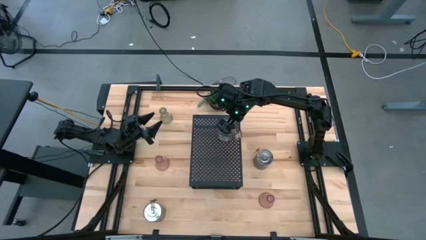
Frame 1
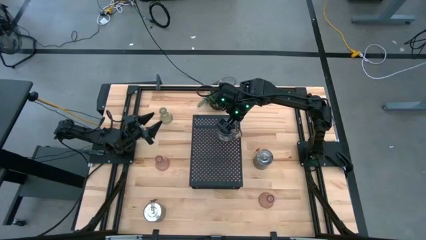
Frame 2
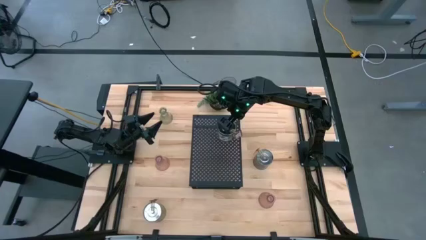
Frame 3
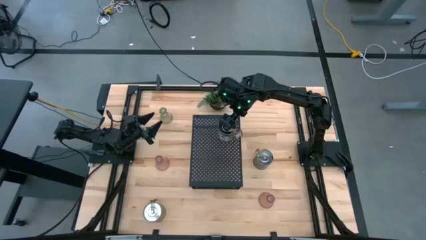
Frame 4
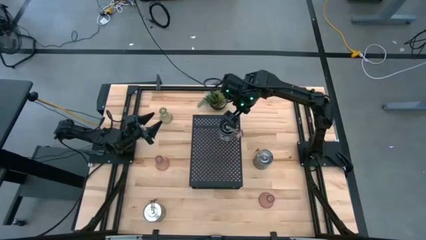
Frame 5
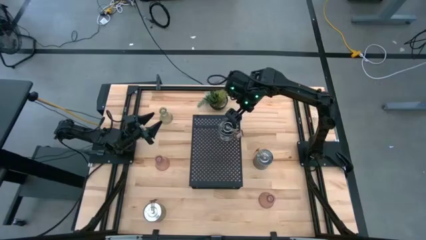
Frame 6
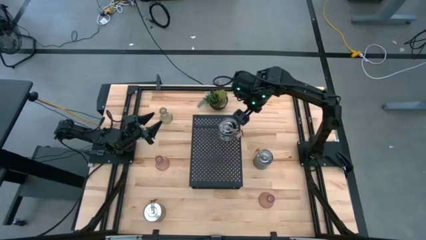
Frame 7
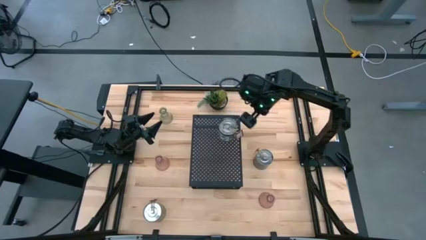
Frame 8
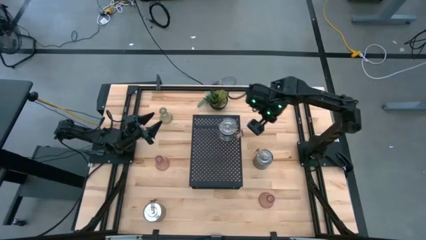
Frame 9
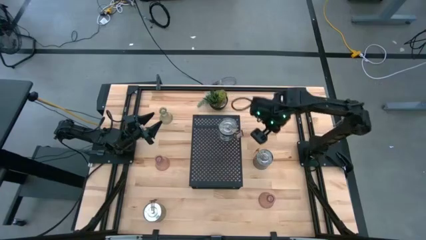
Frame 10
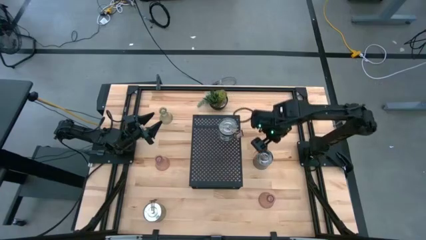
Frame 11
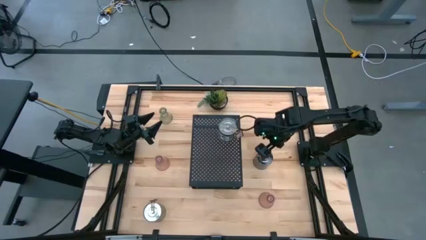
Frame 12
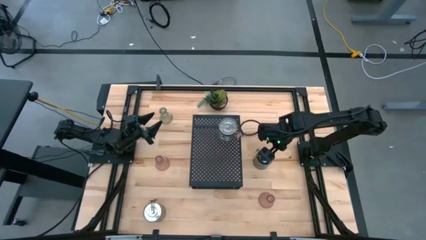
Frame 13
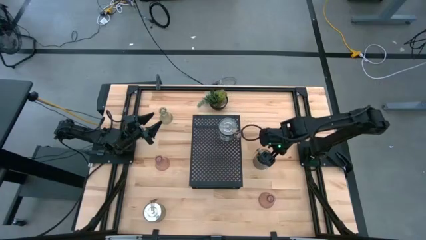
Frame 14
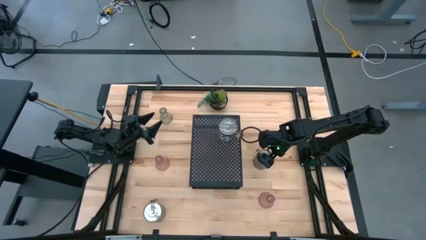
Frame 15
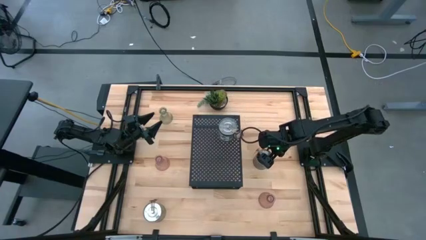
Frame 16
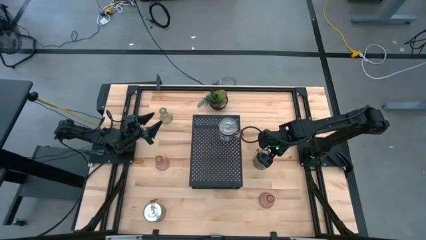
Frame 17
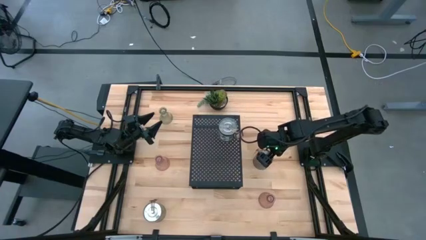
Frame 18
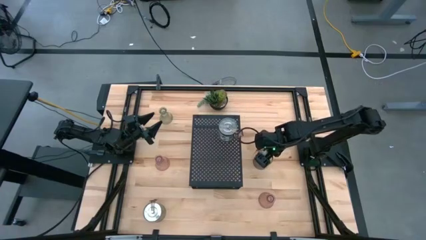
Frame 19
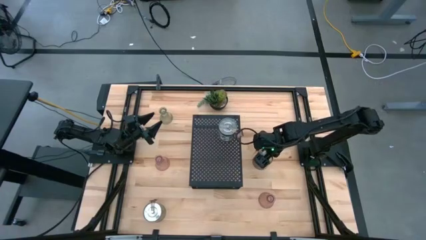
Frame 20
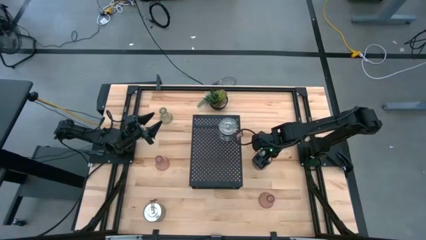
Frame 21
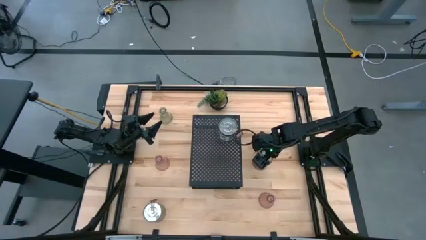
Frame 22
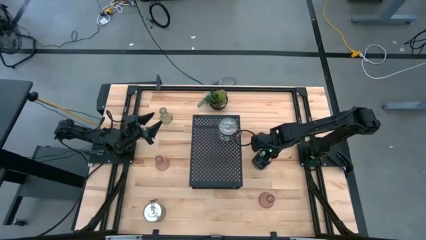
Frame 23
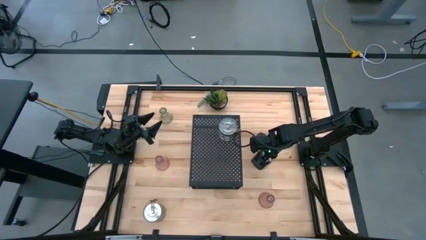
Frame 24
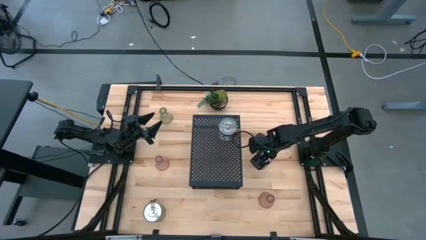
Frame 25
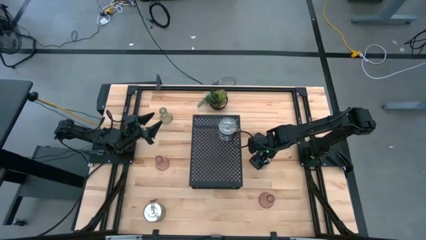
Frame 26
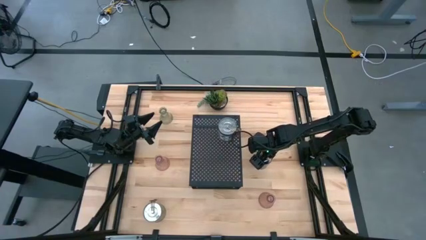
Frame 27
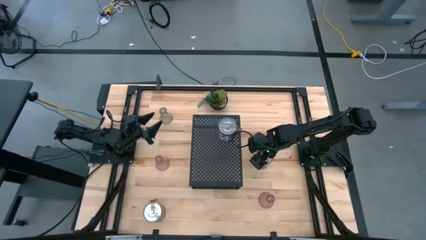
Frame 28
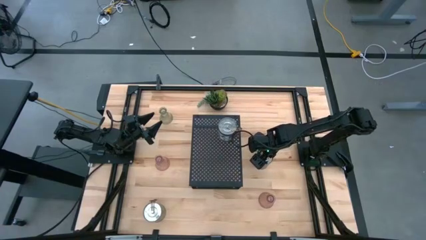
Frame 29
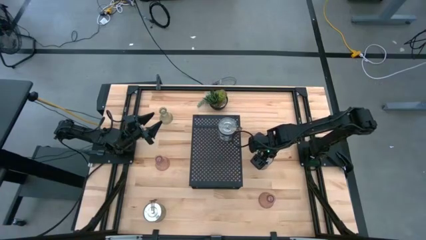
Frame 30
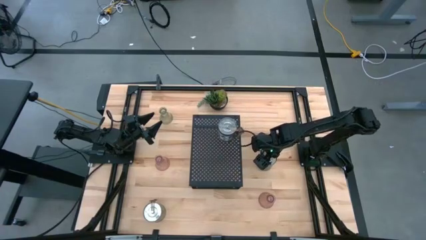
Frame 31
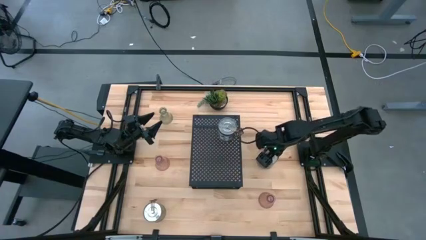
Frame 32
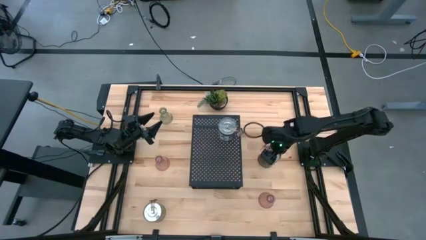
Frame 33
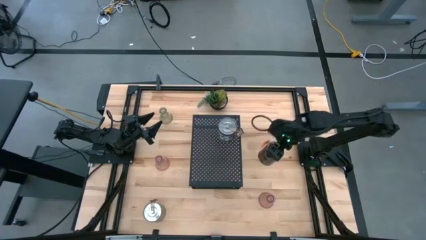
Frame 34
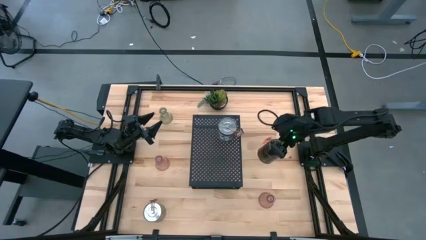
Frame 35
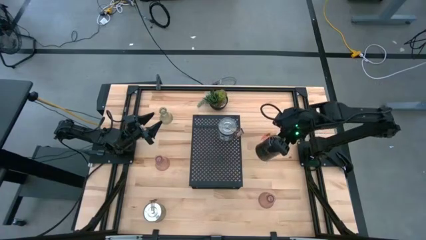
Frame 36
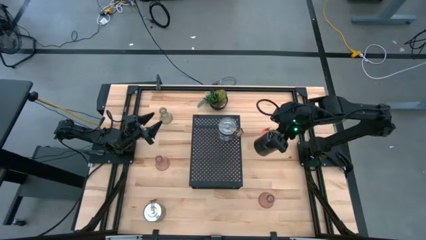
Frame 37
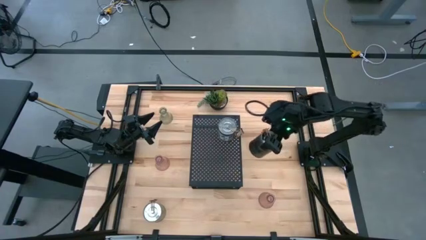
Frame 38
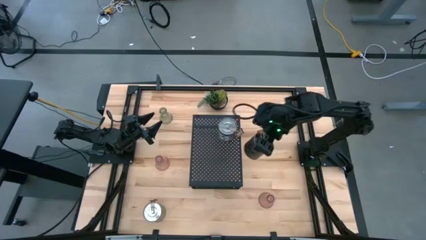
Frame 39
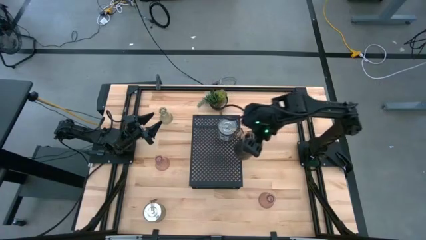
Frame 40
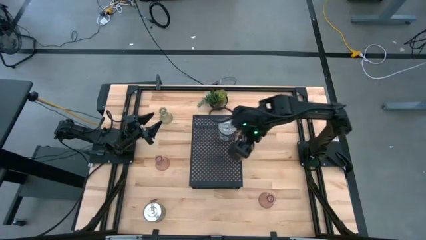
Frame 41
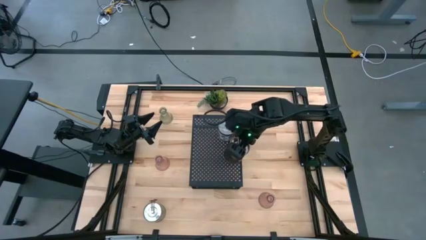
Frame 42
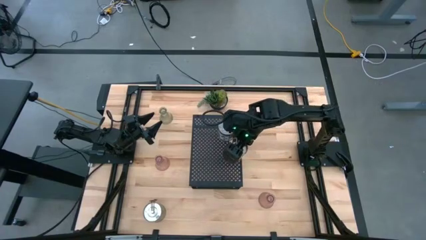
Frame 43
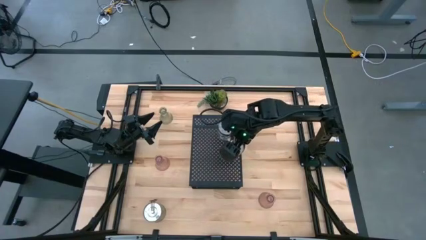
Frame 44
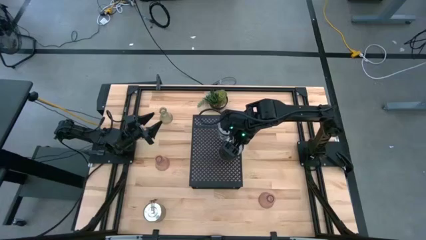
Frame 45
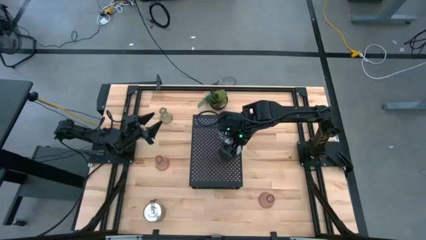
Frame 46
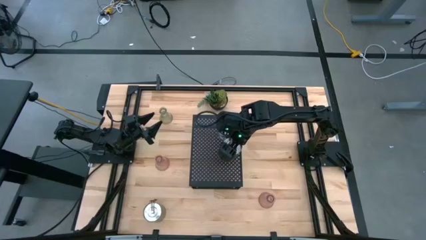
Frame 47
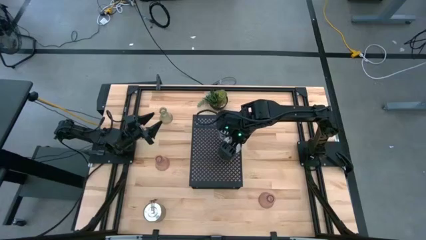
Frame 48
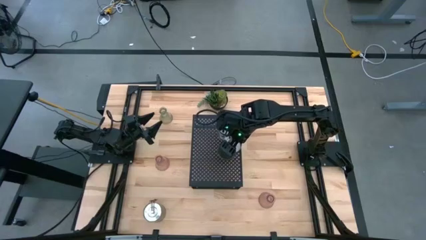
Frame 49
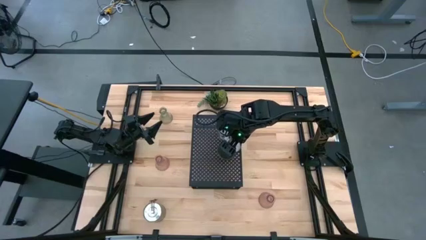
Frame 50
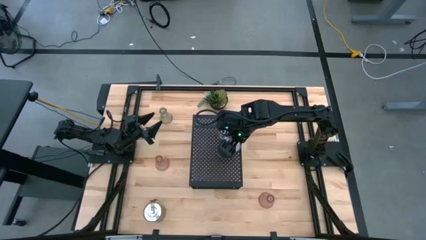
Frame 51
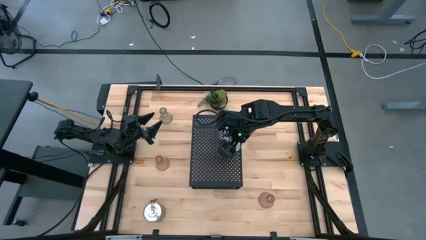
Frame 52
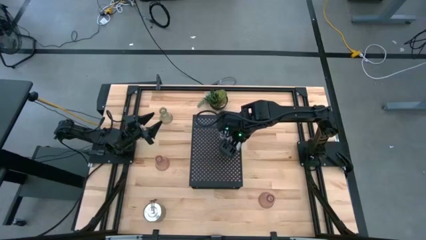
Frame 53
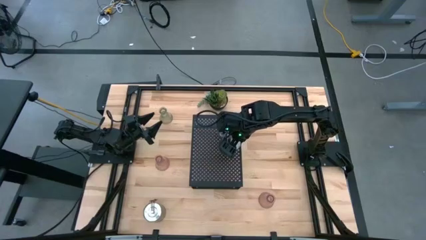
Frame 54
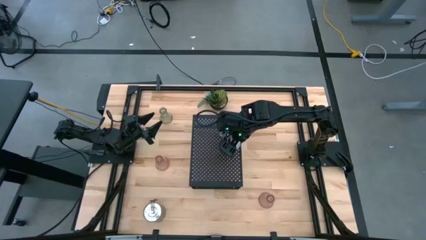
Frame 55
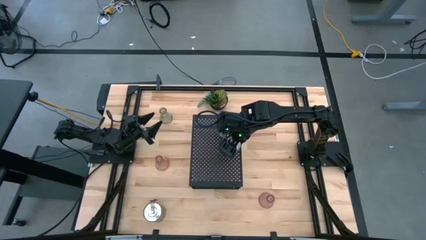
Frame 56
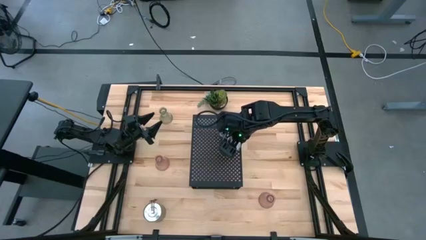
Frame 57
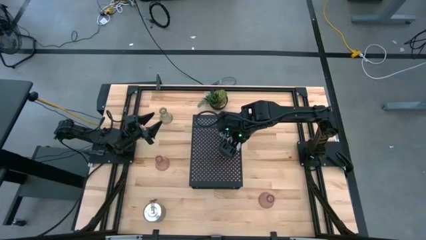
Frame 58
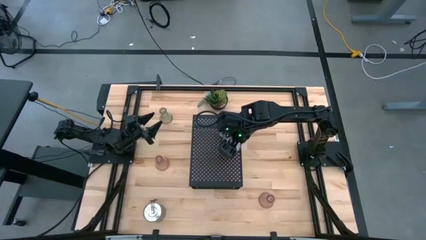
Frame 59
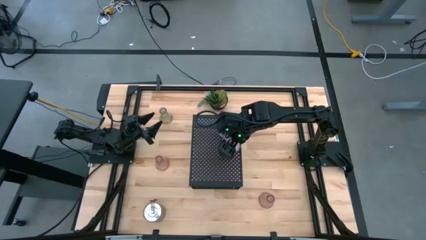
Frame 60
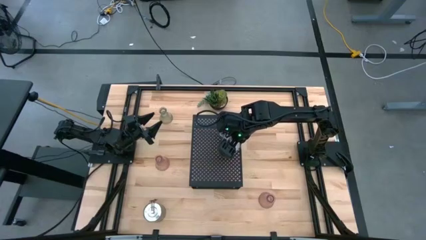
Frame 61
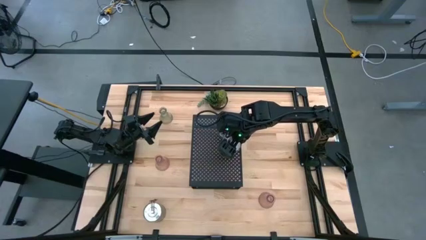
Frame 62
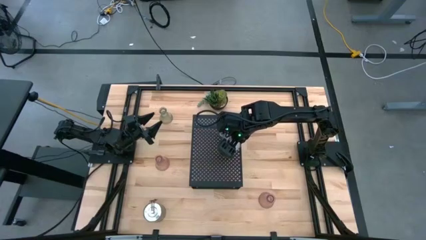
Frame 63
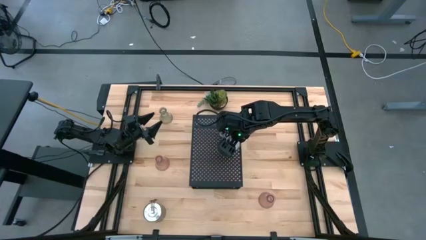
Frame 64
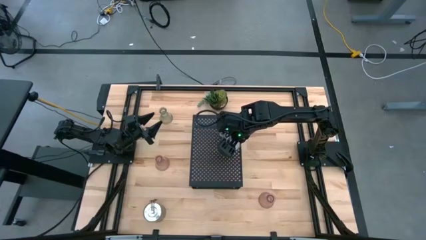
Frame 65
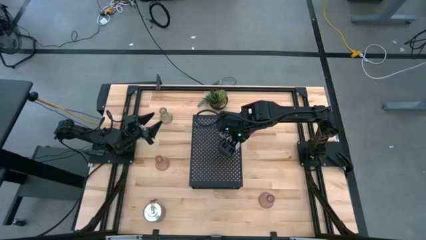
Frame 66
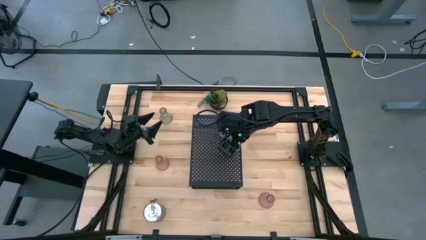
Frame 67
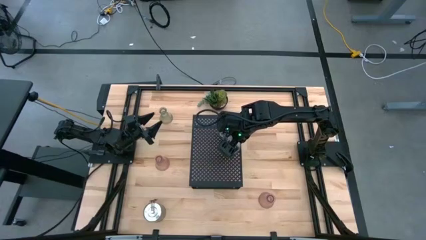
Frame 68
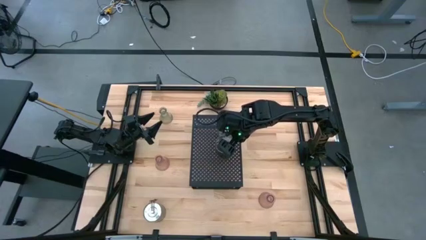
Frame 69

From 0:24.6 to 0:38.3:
Task: Pick & Place candle stick holders
Put the right scented candle can on the shelf aligned with the other scented candle can
